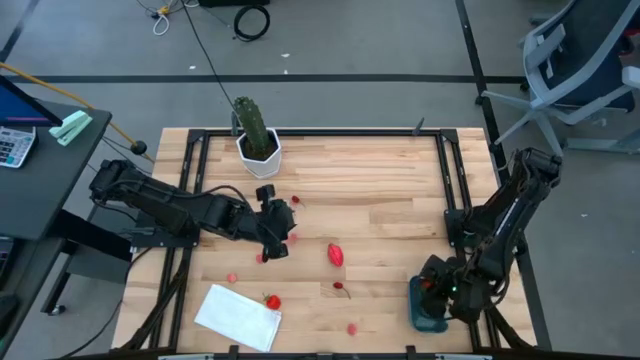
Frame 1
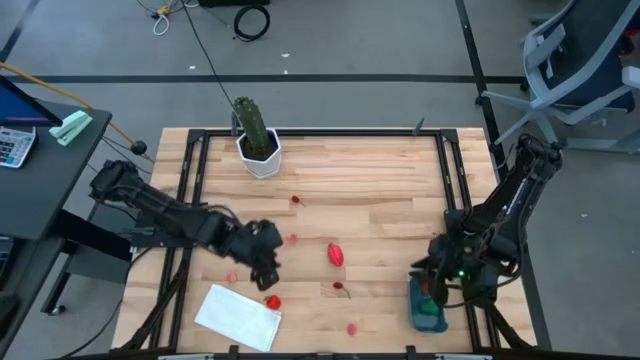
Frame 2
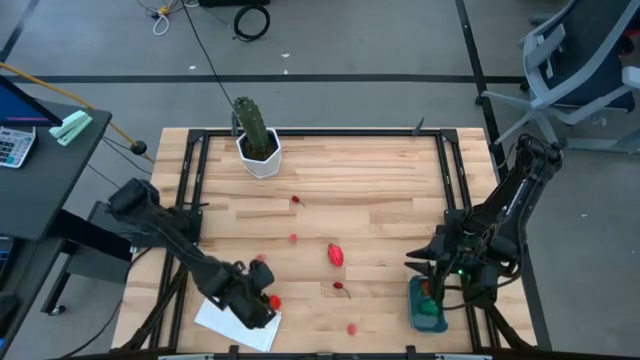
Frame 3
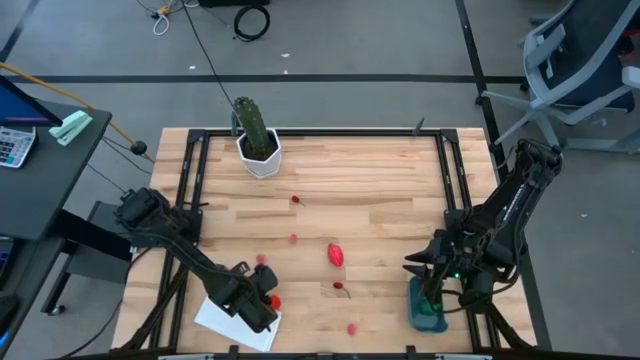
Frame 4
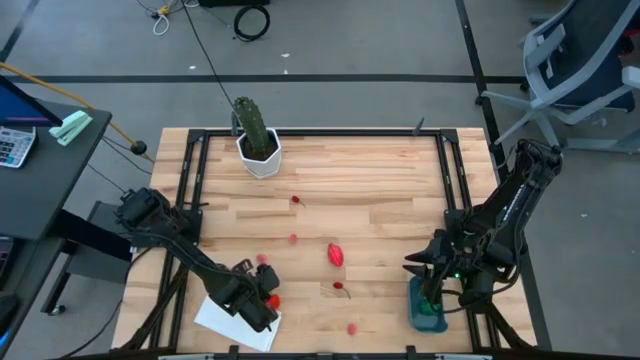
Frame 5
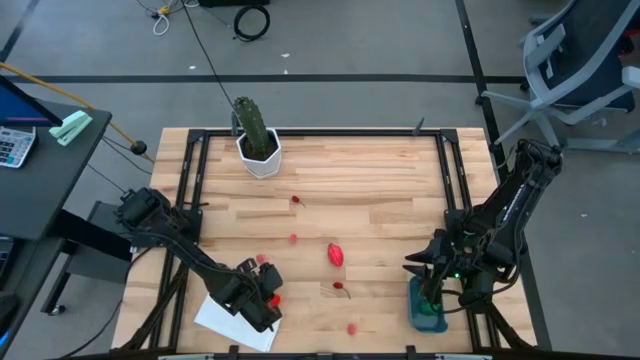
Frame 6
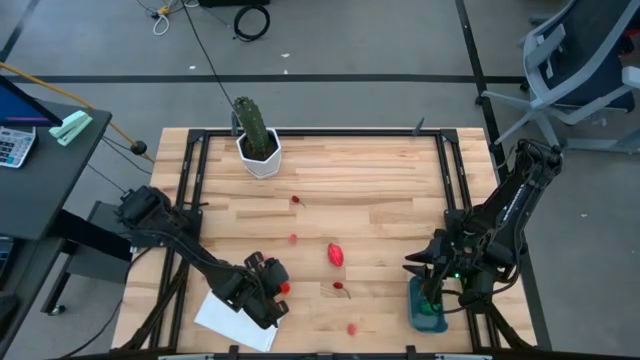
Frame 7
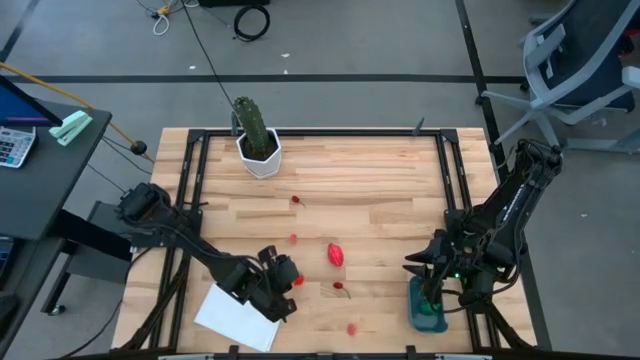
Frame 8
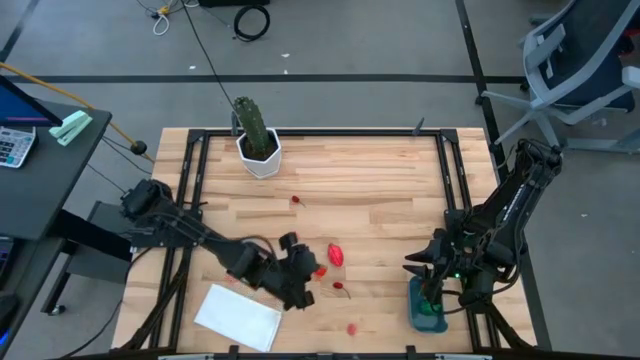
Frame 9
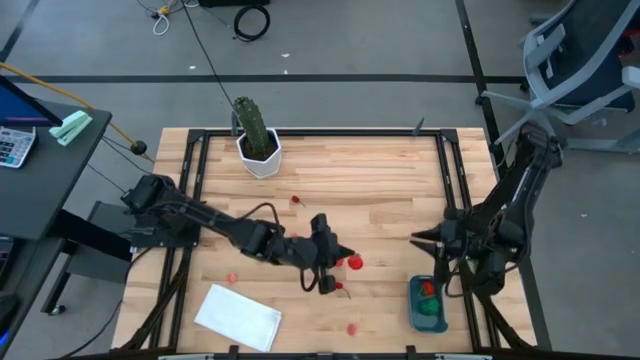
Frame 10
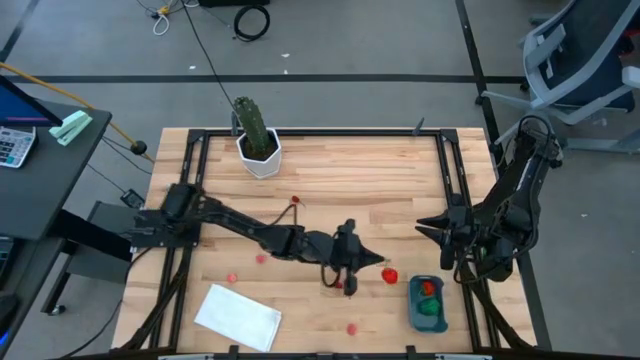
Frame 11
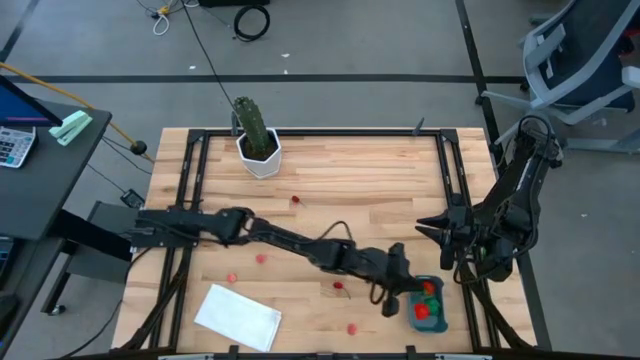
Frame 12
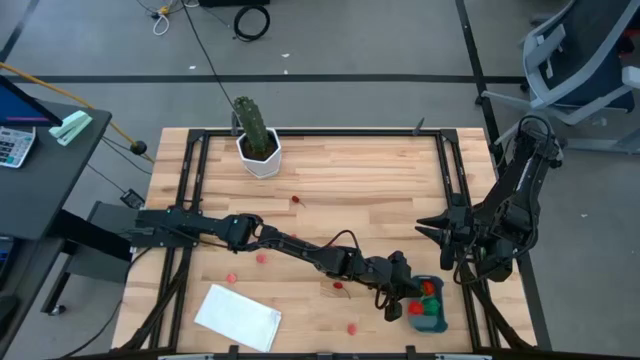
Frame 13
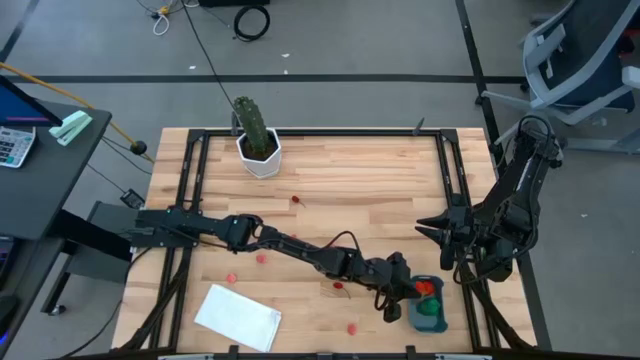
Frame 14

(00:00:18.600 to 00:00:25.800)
Task: Pick and placing Produce into tupperware
Put the red strawberry into the bin

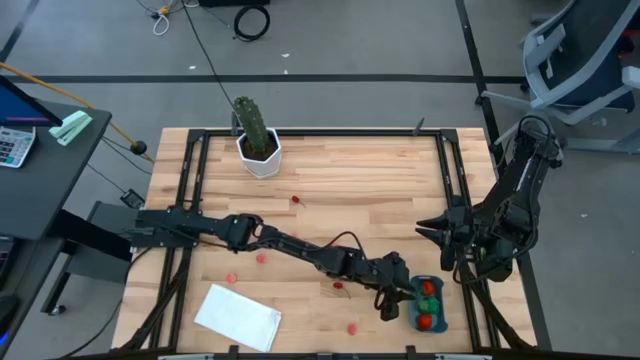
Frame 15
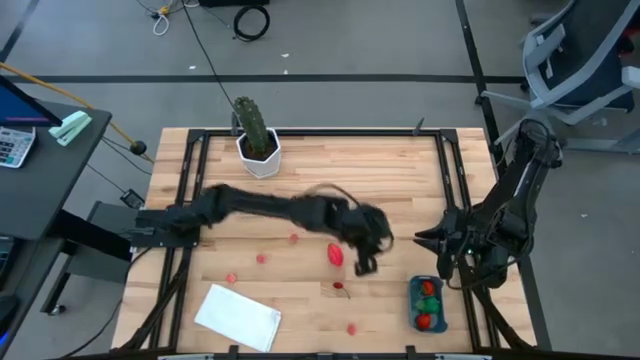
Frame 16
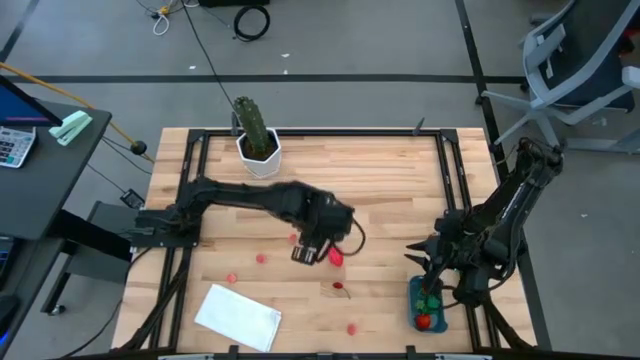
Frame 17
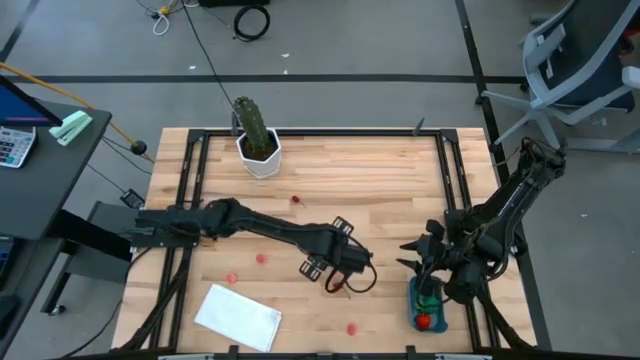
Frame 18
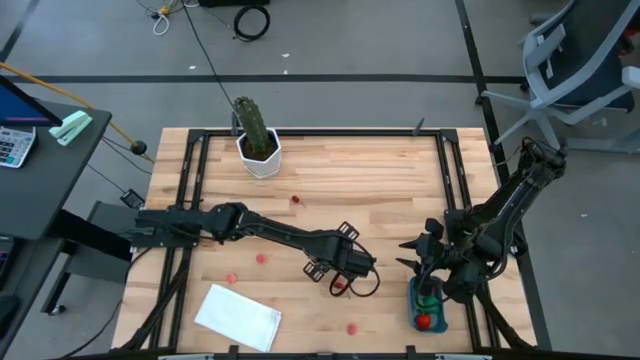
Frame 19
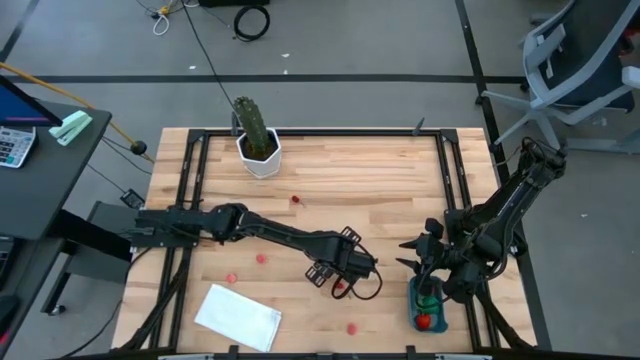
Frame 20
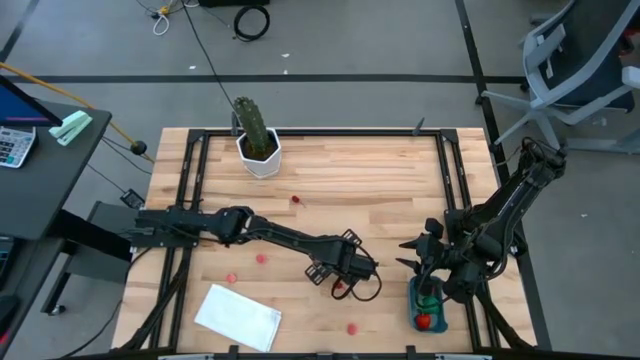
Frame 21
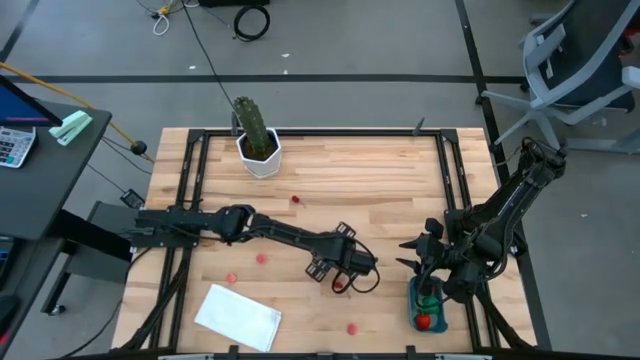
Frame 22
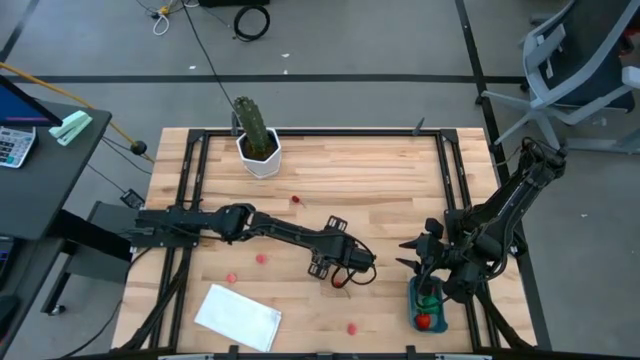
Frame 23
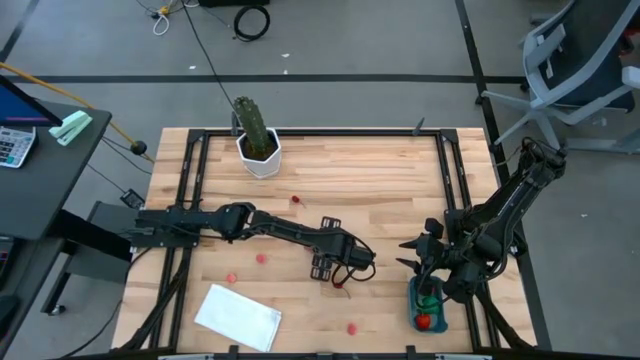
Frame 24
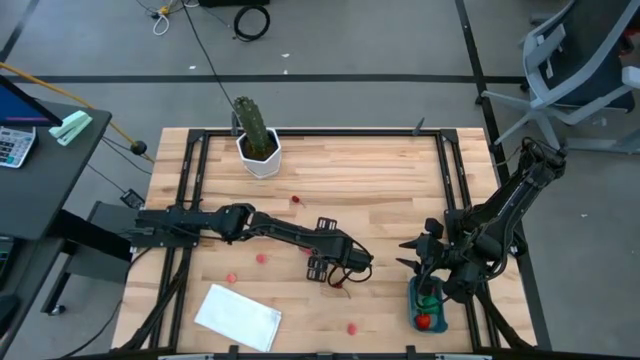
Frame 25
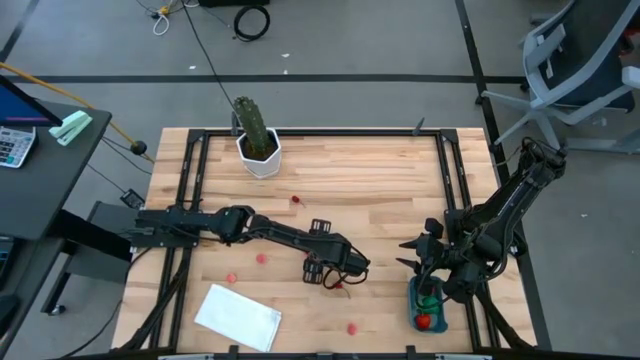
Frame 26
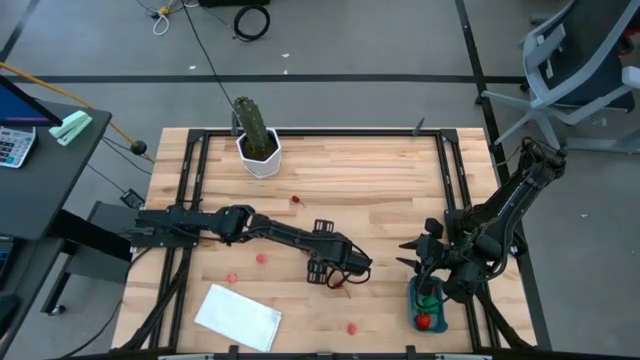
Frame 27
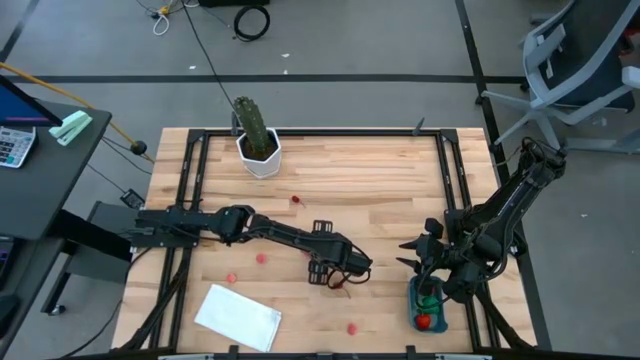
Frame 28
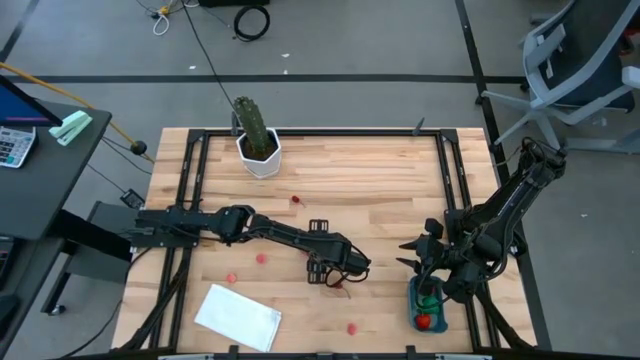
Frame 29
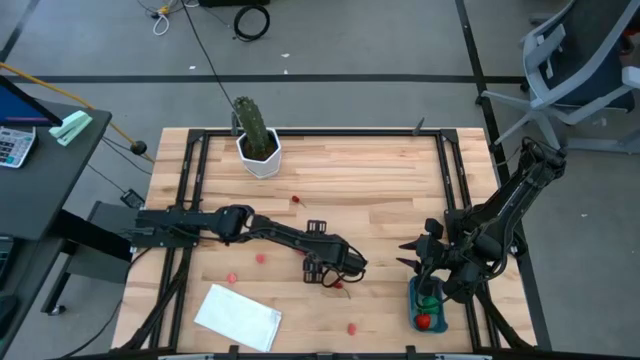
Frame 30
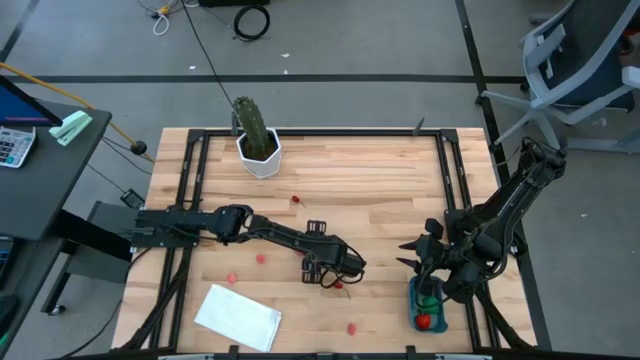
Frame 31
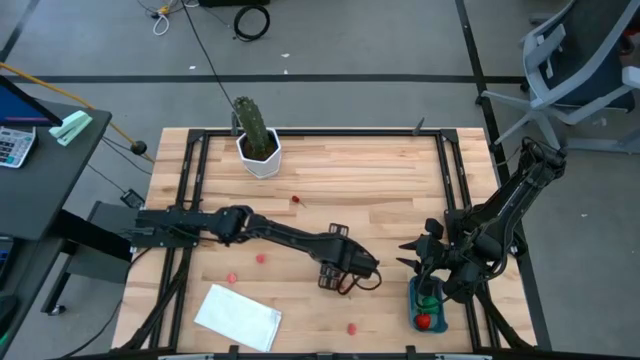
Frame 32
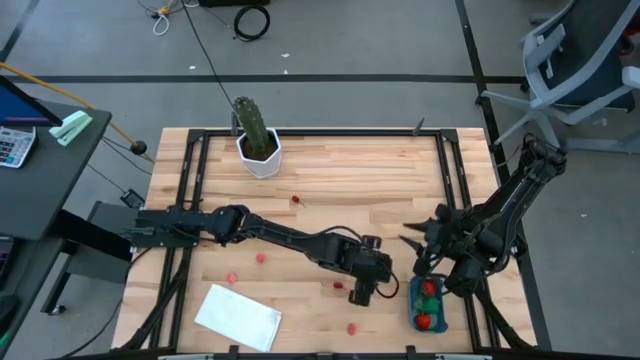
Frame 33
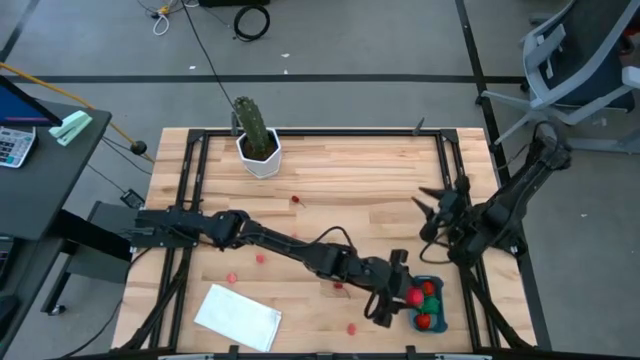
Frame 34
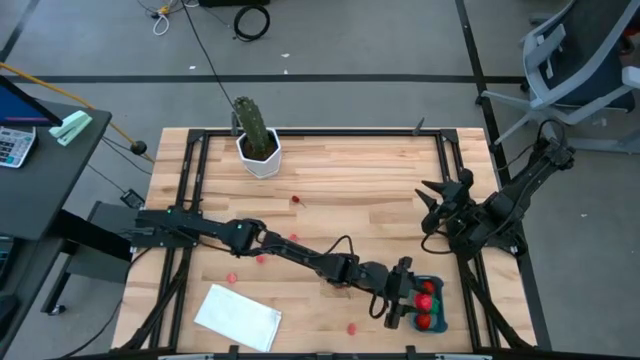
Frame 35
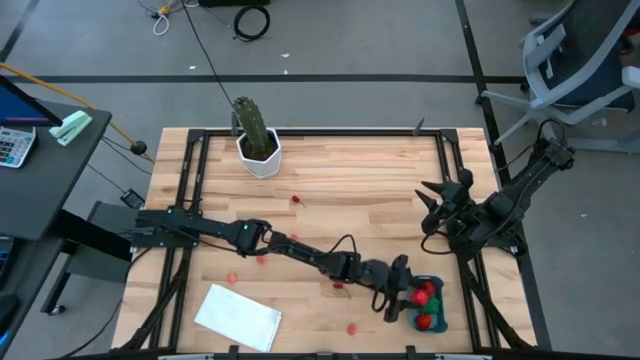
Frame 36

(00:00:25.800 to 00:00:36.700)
Put the dragon fruit into the bin

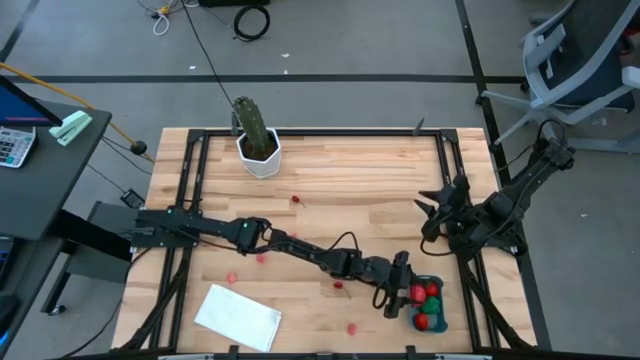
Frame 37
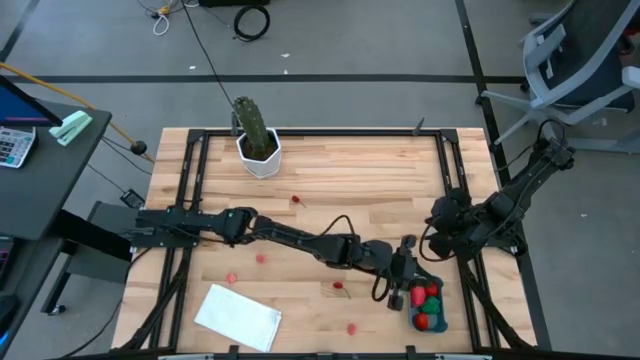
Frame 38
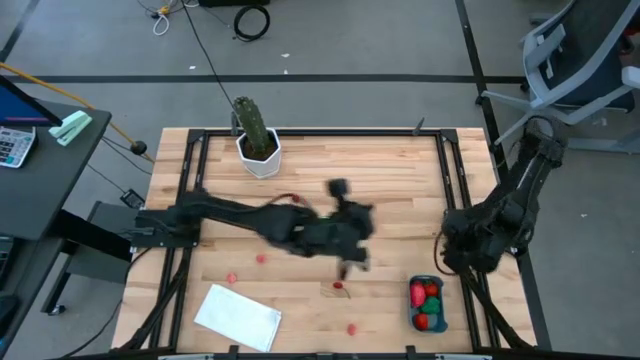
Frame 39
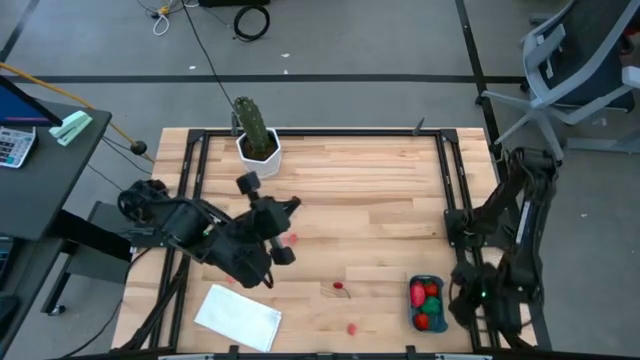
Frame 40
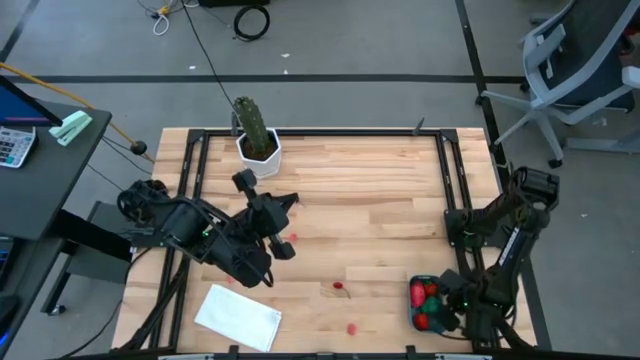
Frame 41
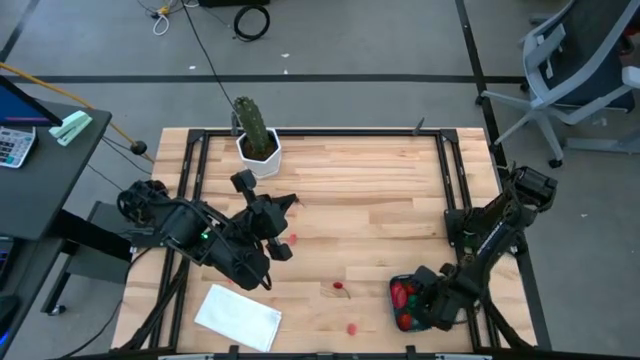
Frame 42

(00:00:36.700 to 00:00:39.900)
Adjust the bin to the left
